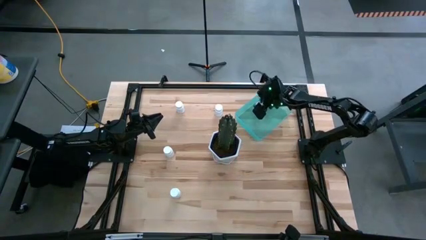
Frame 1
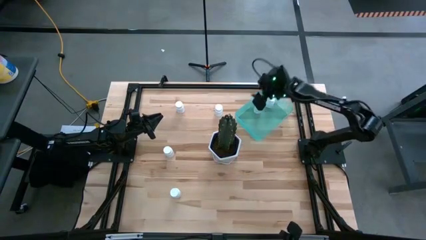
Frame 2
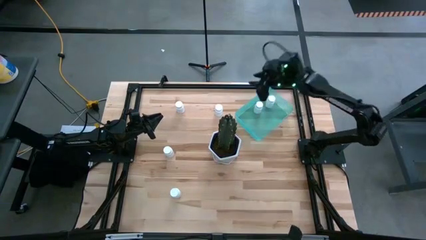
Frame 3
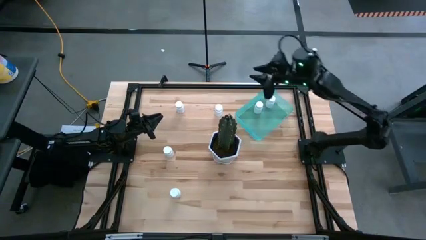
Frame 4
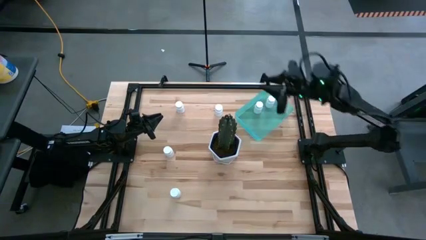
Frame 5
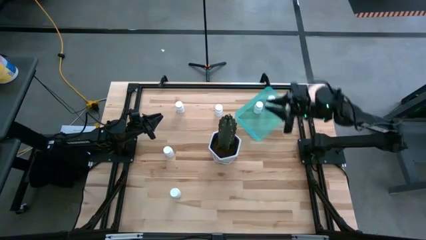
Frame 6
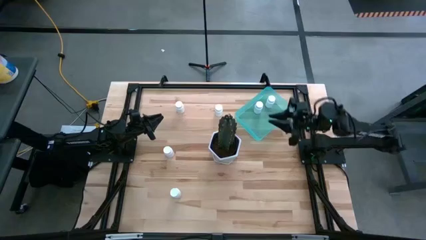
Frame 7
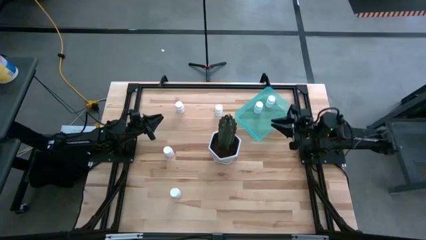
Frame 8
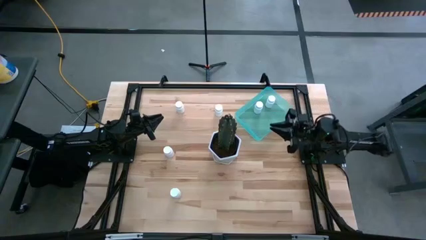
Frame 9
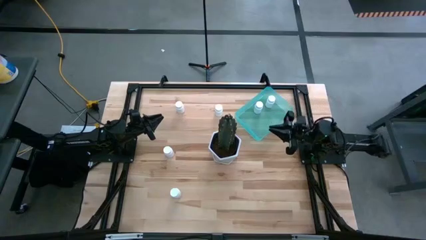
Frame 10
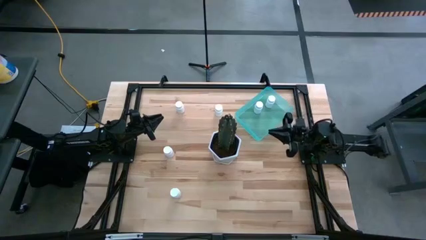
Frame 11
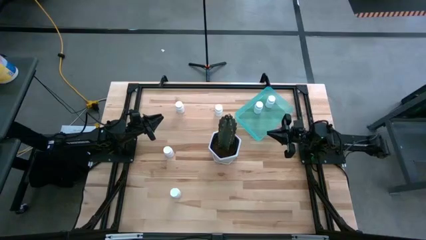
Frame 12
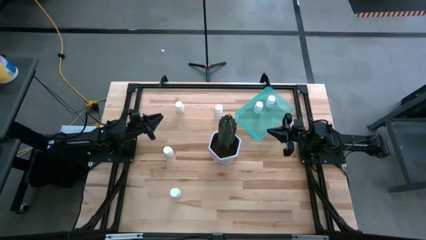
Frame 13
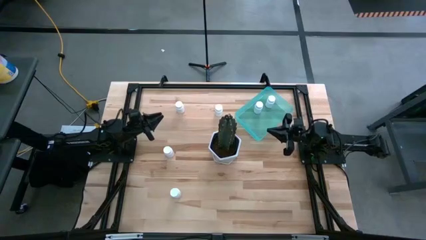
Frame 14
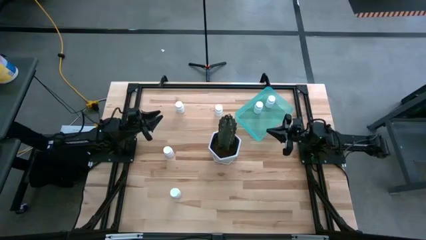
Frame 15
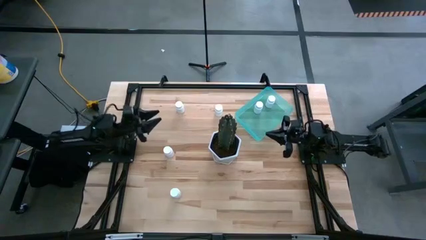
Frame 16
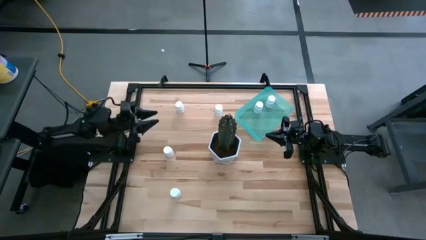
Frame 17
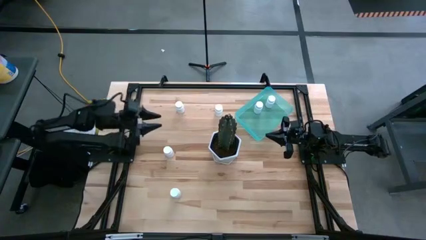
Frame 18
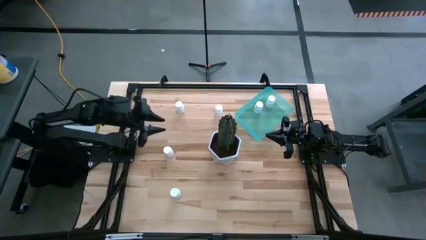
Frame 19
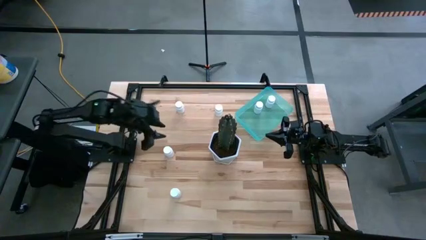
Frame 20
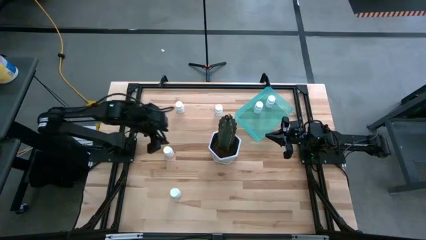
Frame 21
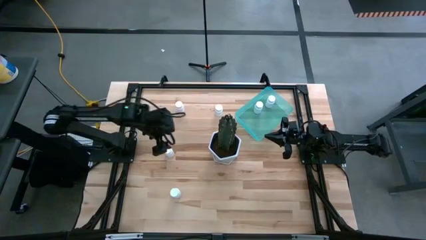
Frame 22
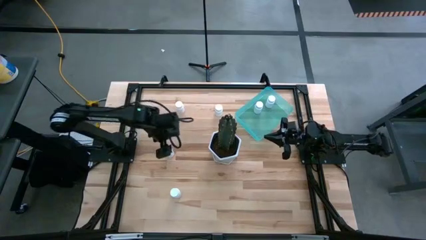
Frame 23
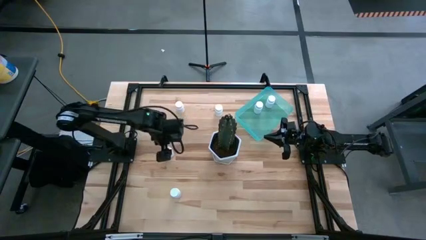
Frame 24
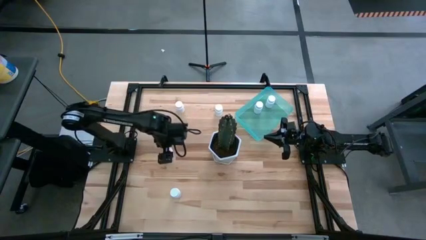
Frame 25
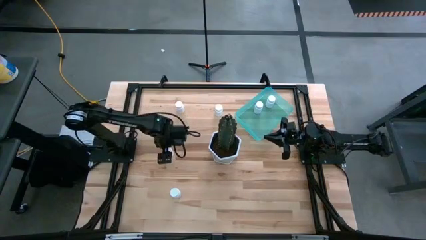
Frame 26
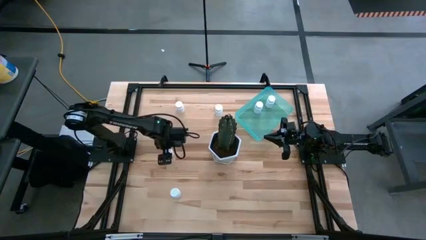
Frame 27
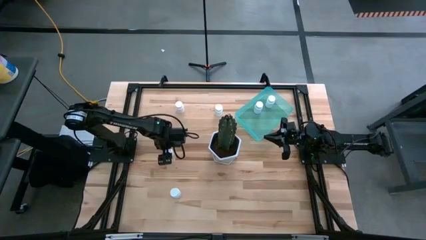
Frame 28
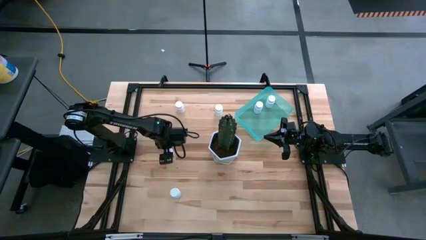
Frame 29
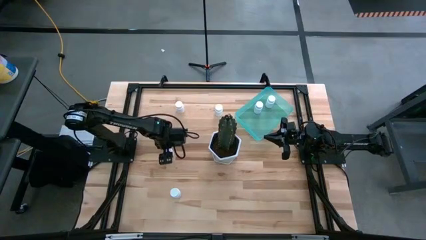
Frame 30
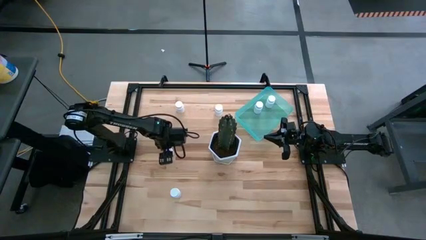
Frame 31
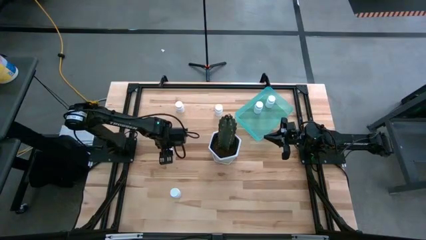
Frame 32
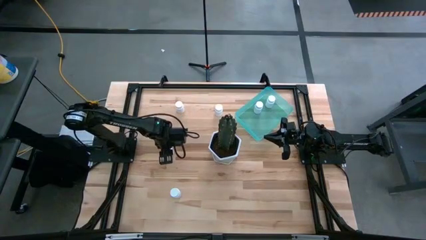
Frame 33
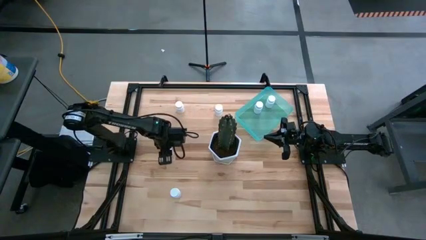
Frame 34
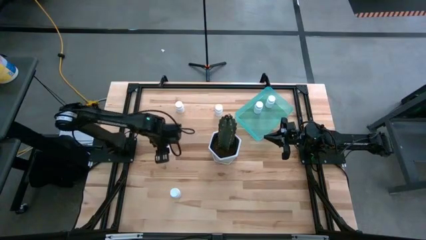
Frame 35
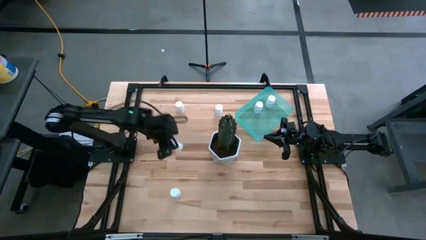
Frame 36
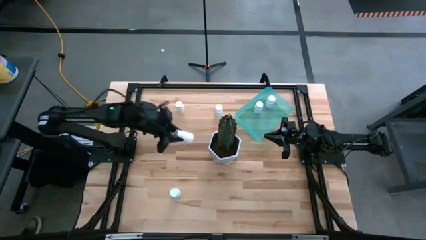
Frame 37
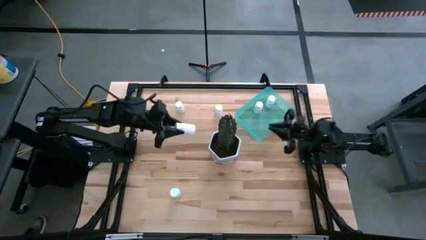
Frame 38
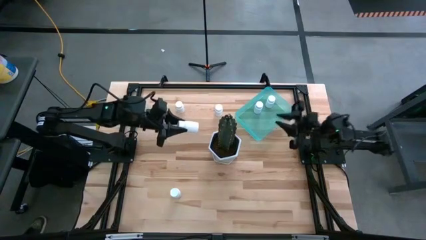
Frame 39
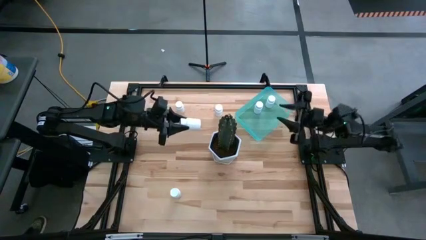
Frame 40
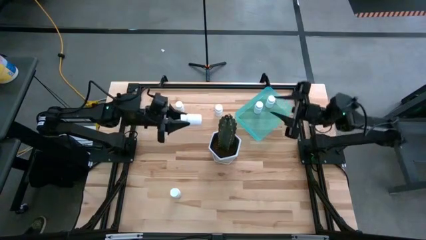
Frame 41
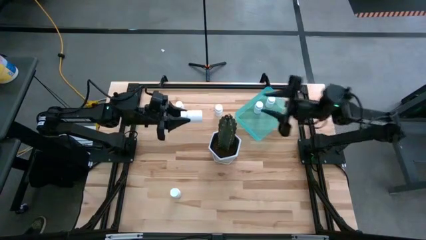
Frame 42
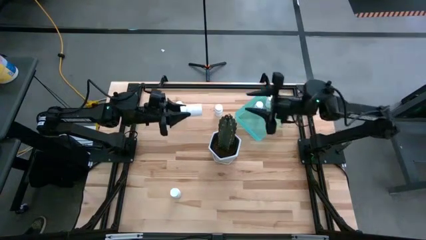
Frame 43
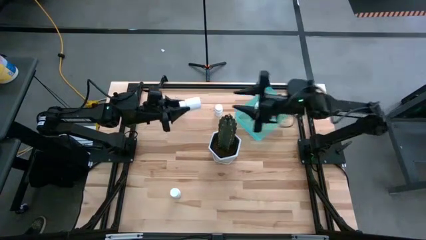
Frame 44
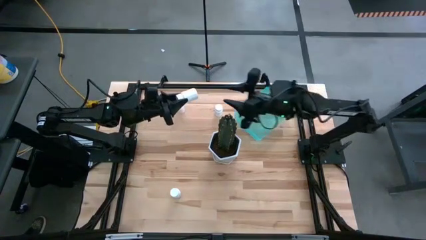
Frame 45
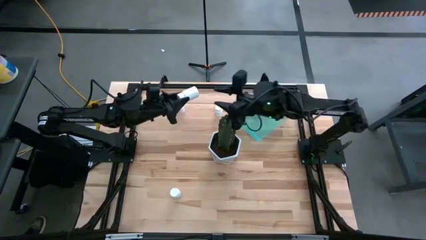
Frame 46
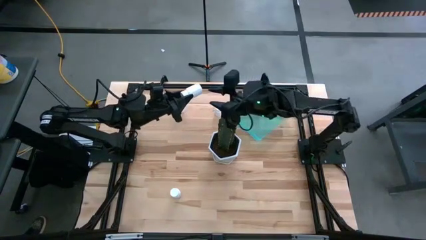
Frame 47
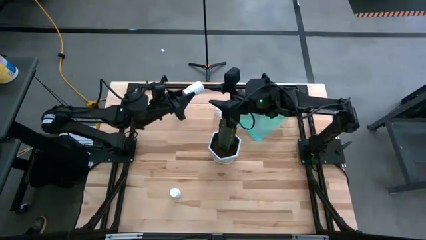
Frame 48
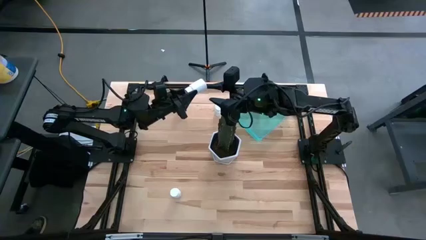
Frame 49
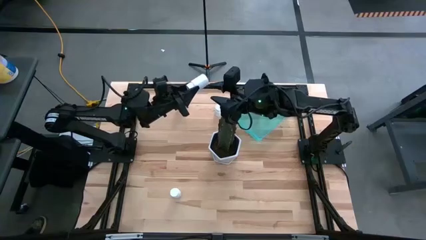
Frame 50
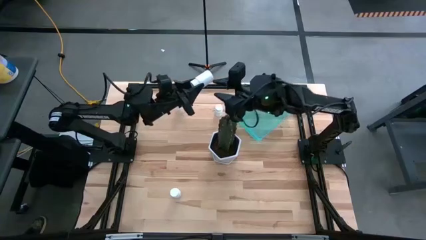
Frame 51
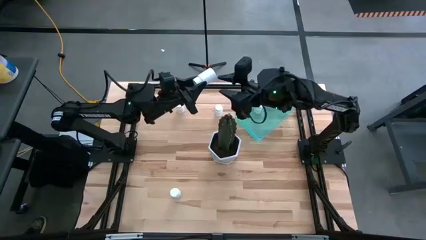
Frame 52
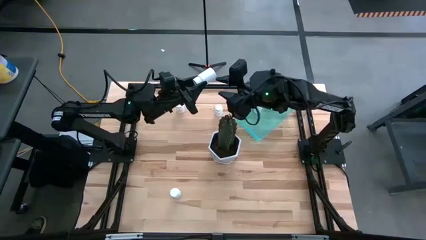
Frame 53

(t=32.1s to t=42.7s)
Task: Pick and place pill bottles into a basket
Put the white medicine bottle into the blue bin

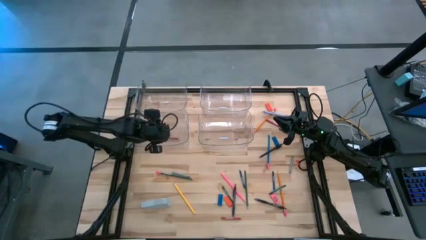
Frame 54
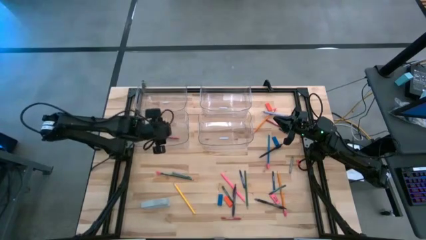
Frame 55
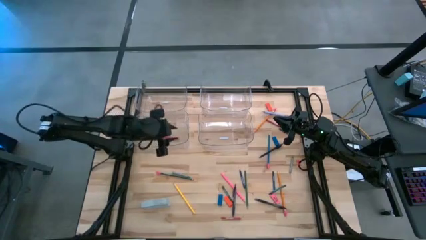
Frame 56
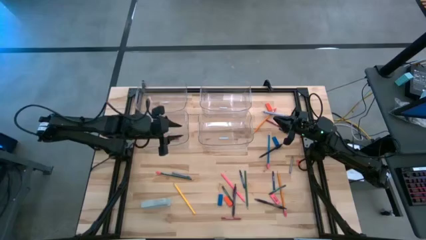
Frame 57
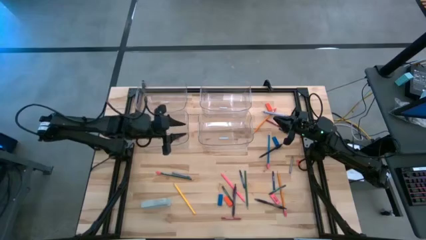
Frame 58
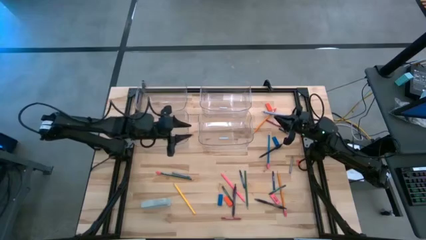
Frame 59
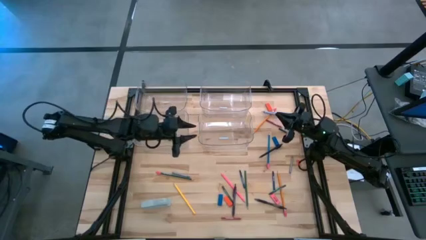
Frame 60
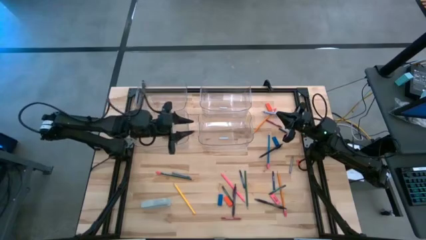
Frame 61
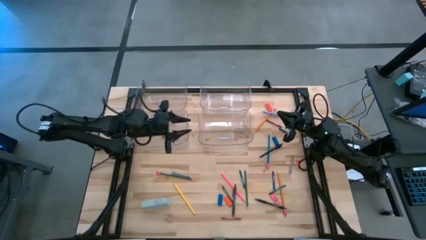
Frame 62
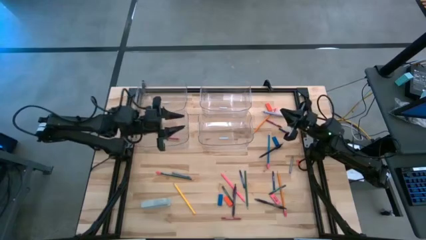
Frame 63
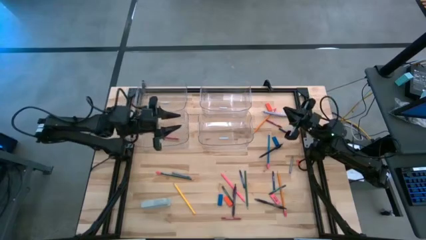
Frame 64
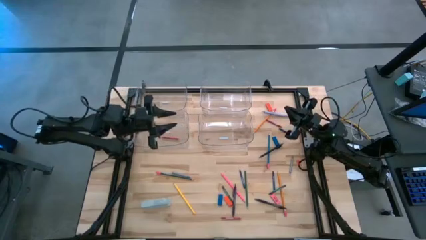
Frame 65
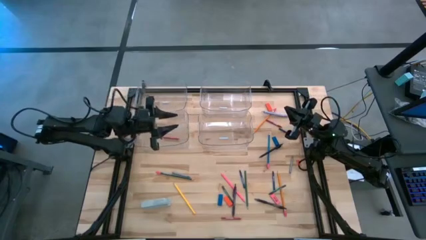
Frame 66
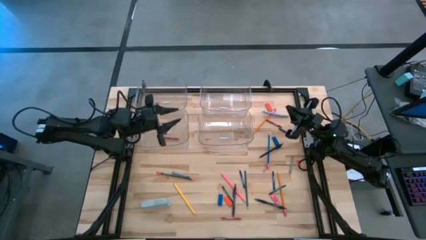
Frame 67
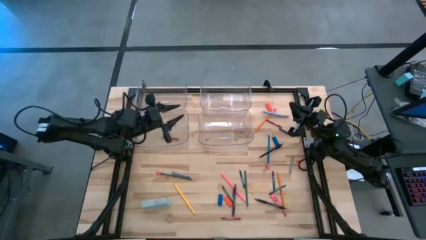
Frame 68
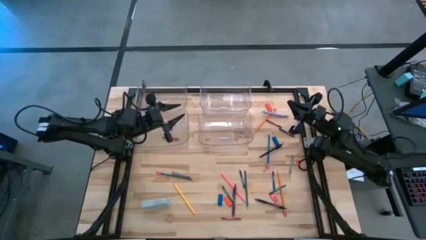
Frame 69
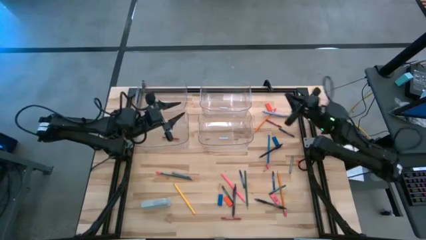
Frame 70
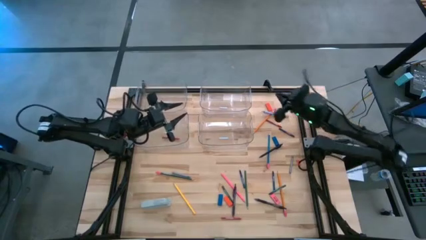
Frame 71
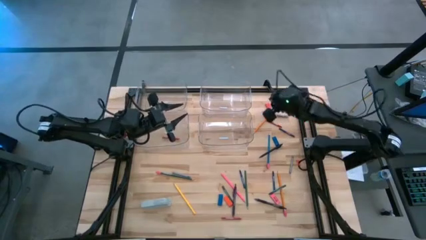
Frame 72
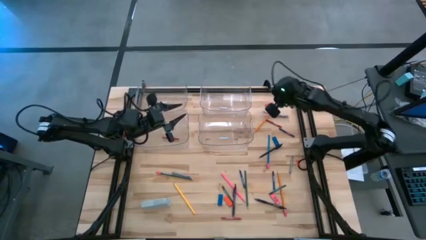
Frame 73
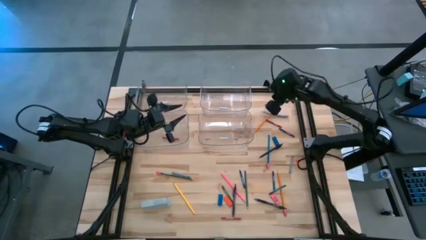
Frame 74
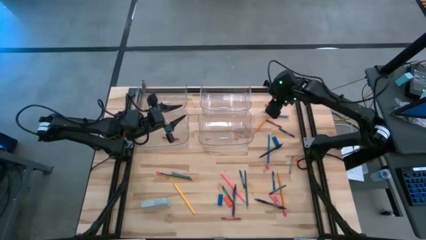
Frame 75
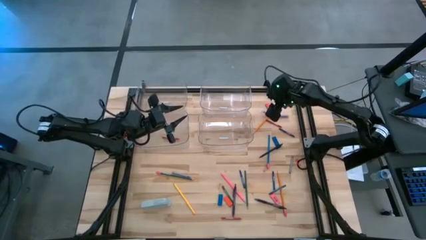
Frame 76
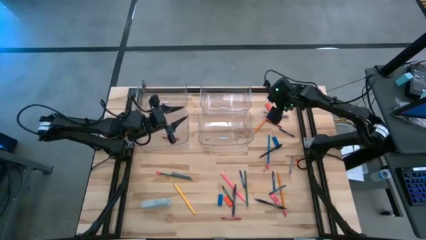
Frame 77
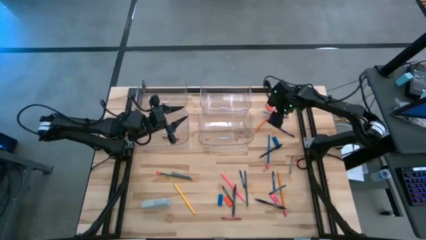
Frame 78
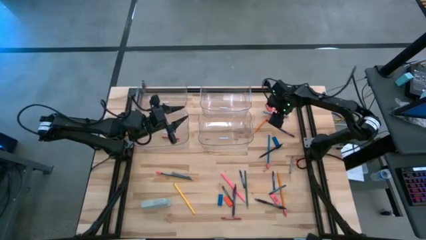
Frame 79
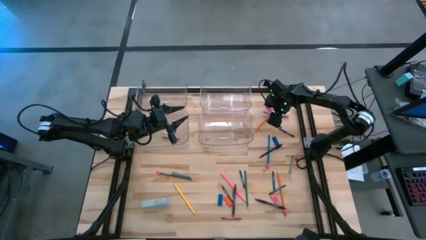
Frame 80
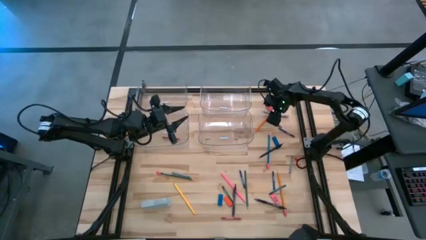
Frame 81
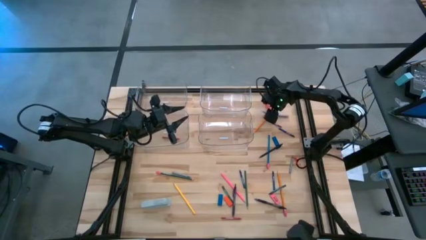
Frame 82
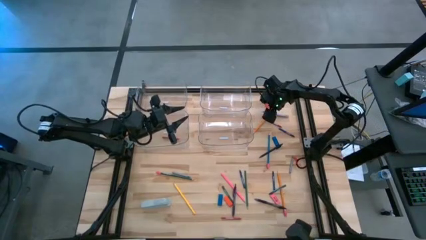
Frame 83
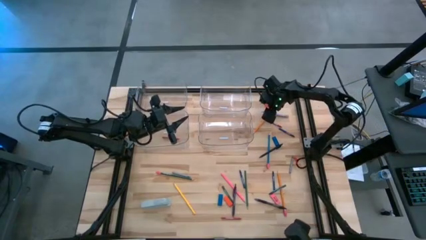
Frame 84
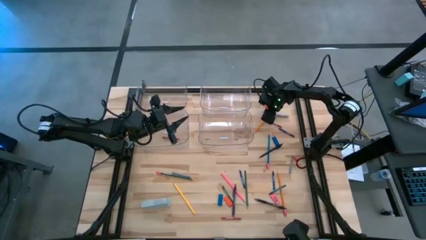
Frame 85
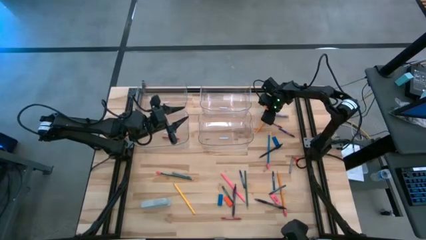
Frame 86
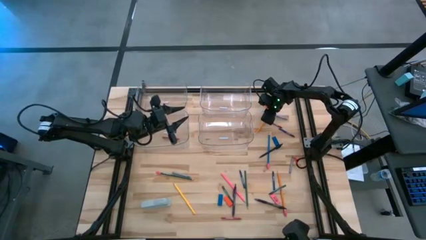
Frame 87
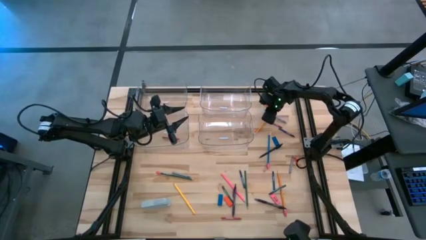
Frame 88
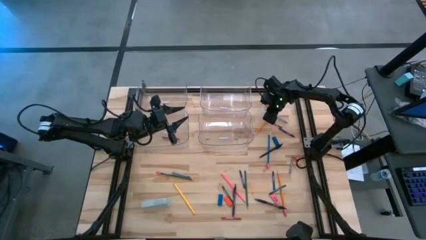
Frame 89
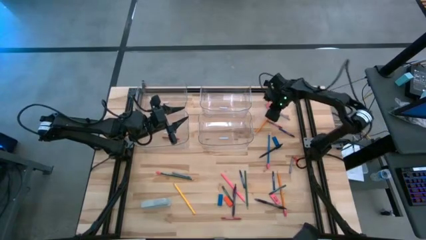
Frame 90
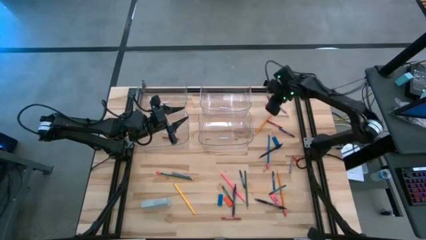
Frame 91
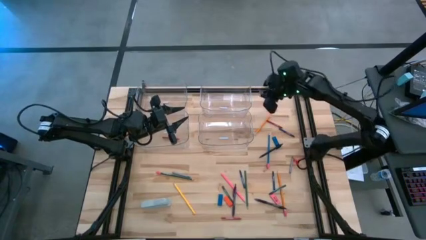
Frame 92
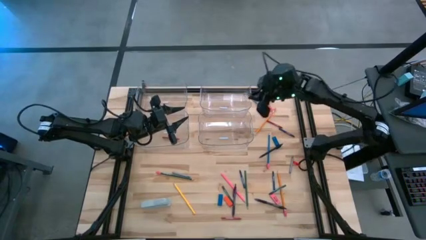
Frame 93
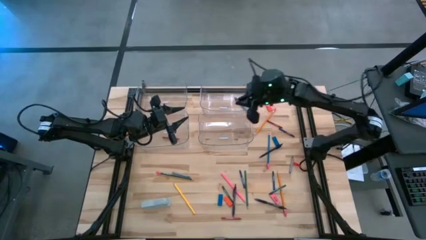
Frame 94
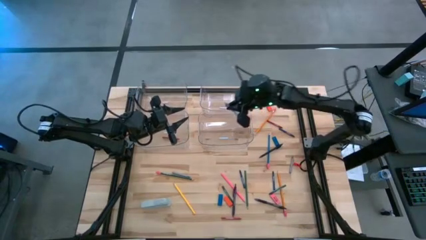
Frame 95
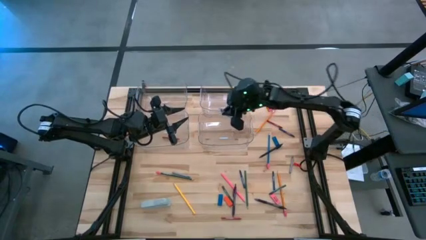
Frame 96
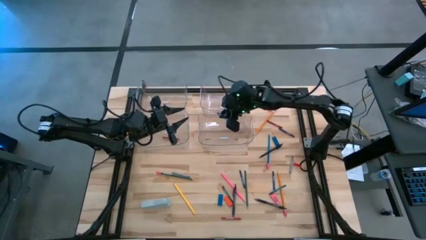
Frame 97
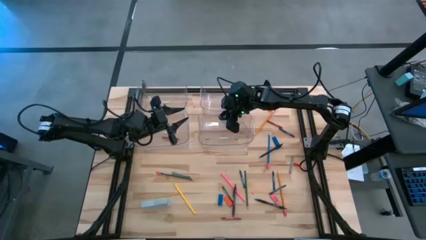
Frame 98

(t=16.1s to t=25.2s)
Task: Sort crayons/erasers/pens/pencils in bins
Put the top purple pen into the bottom right transparent bin
